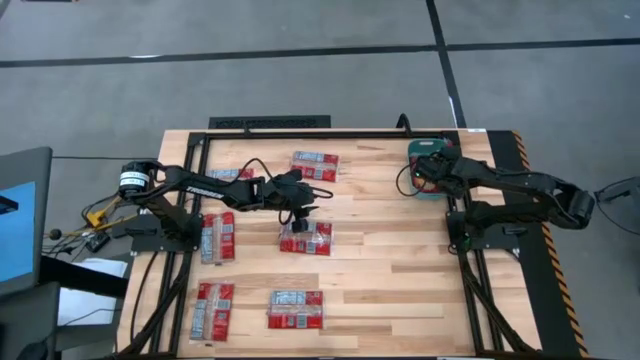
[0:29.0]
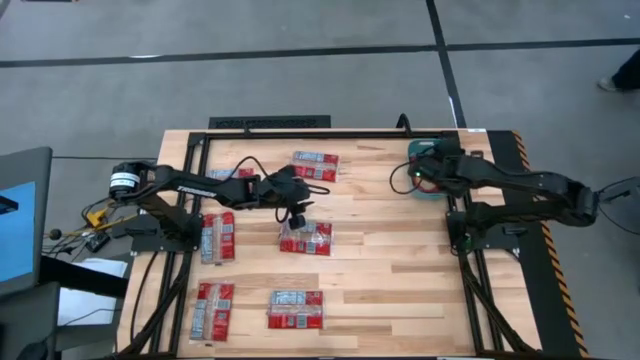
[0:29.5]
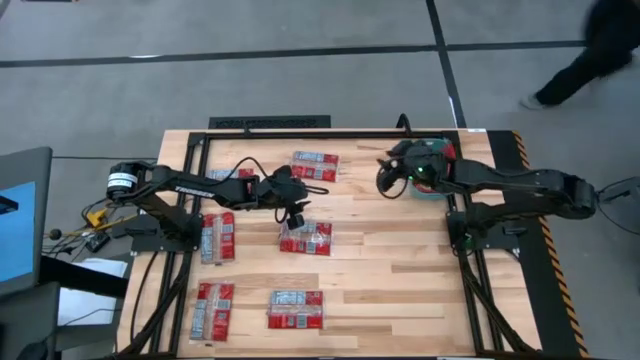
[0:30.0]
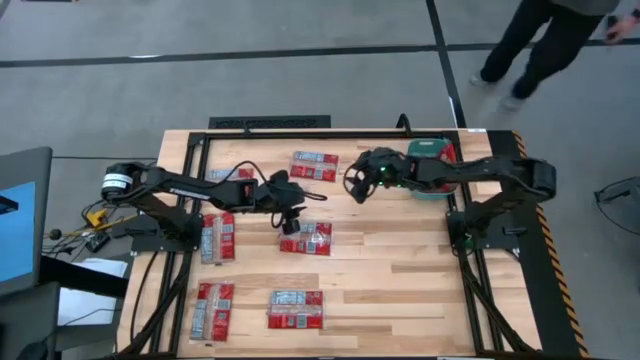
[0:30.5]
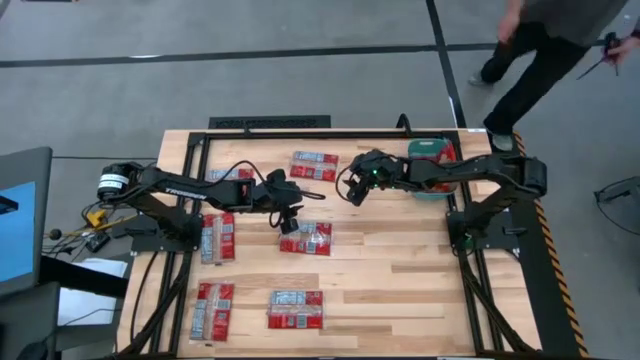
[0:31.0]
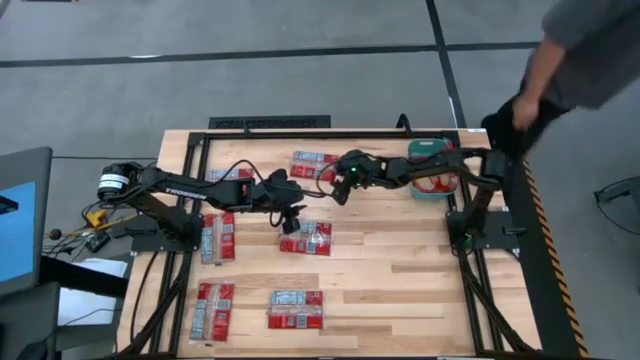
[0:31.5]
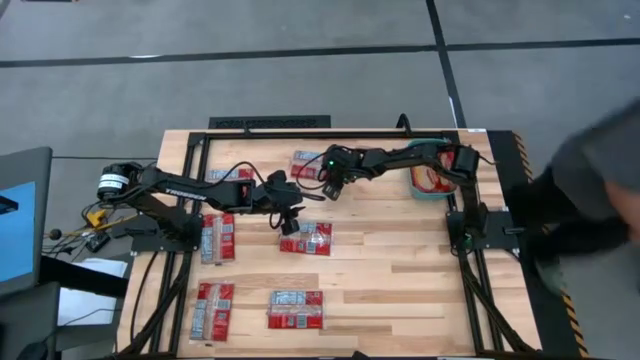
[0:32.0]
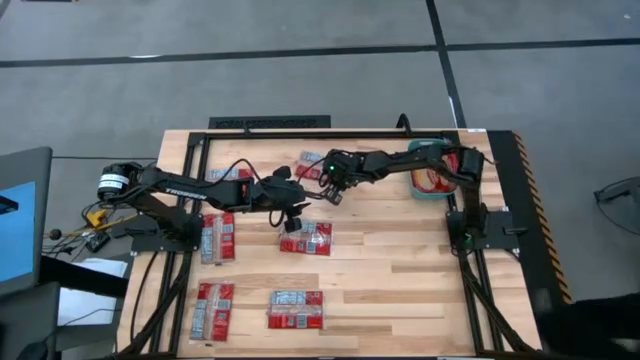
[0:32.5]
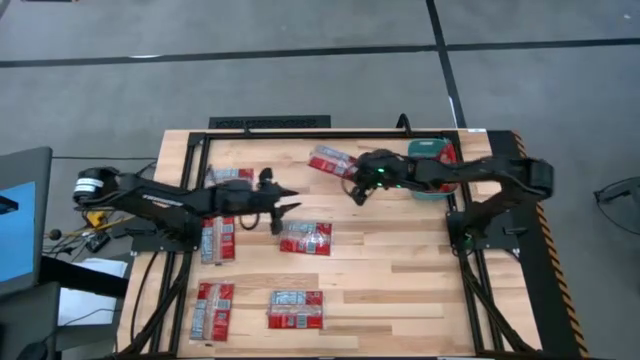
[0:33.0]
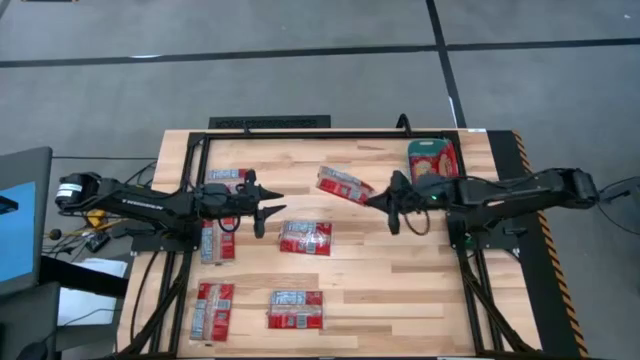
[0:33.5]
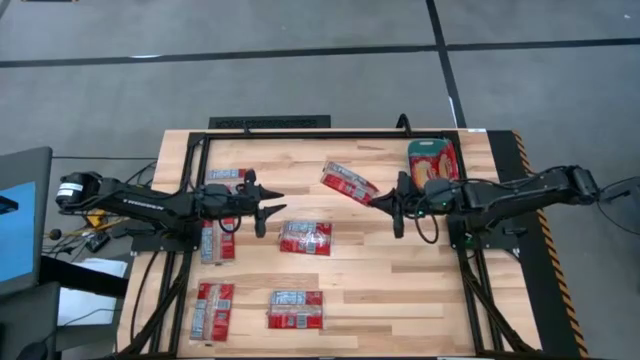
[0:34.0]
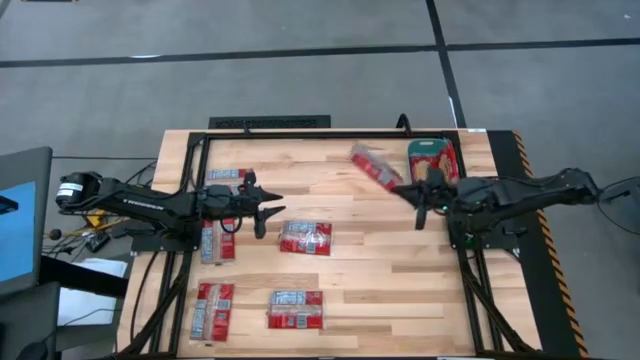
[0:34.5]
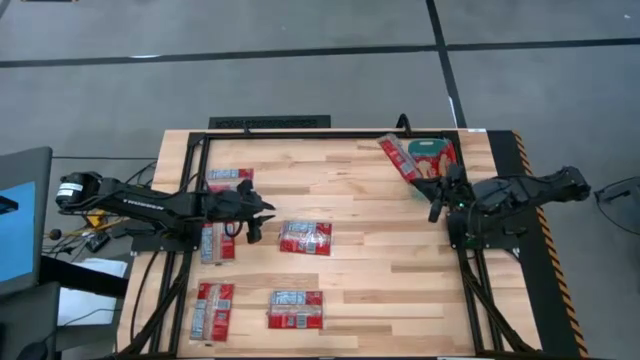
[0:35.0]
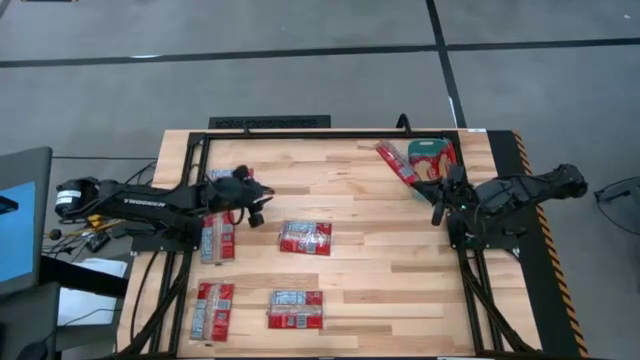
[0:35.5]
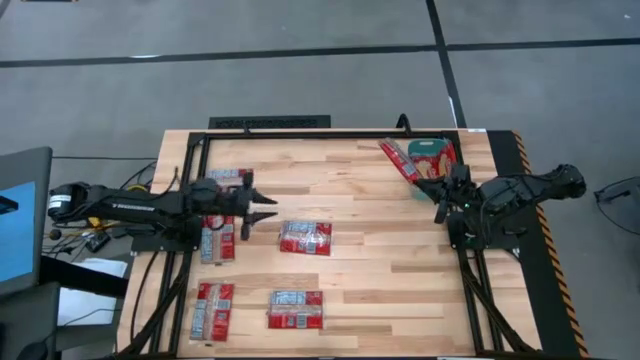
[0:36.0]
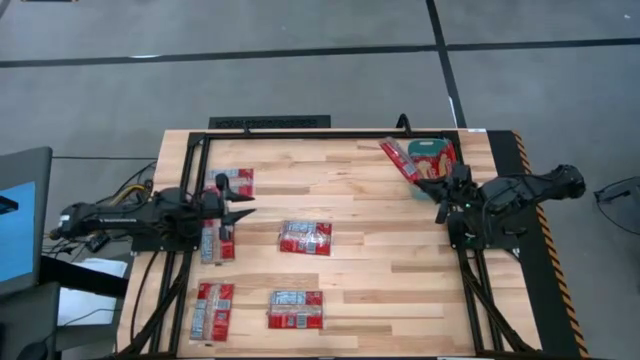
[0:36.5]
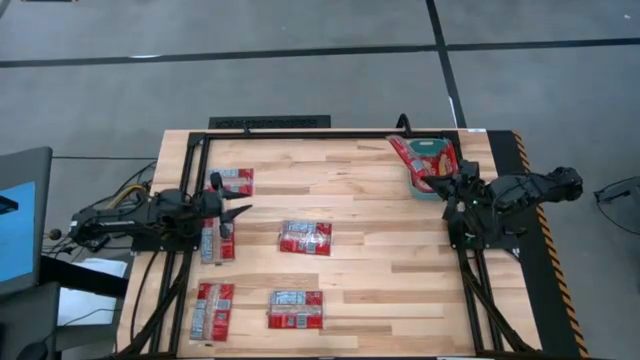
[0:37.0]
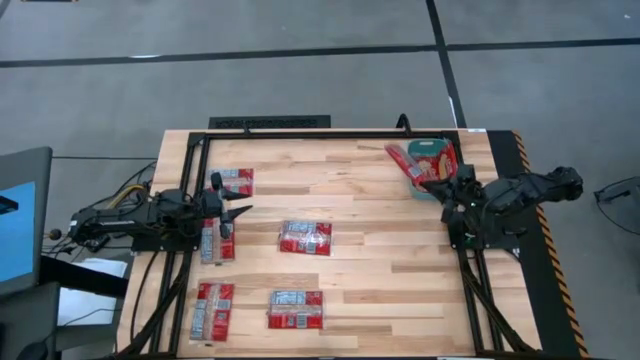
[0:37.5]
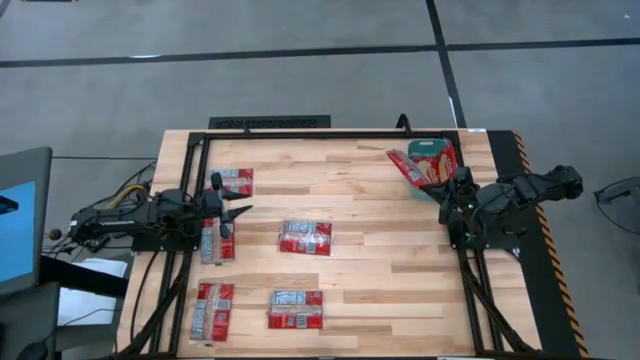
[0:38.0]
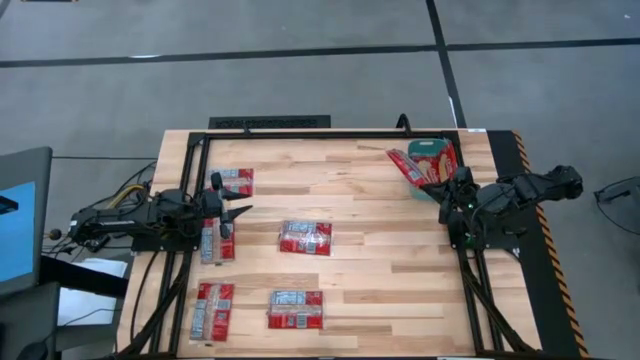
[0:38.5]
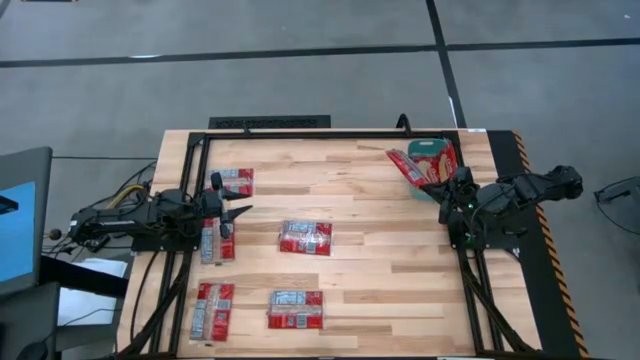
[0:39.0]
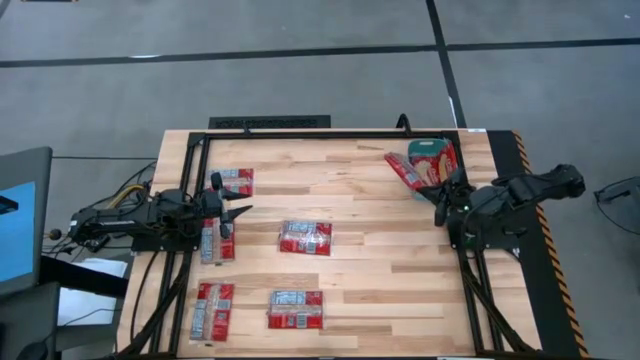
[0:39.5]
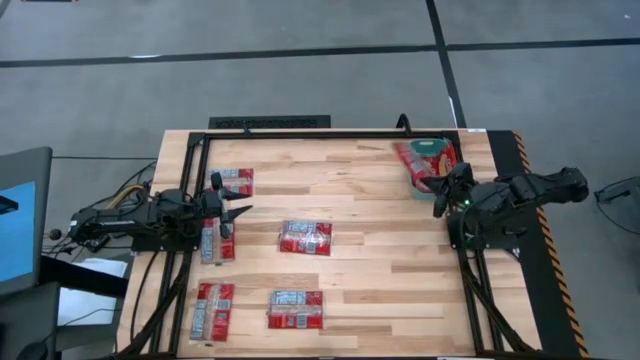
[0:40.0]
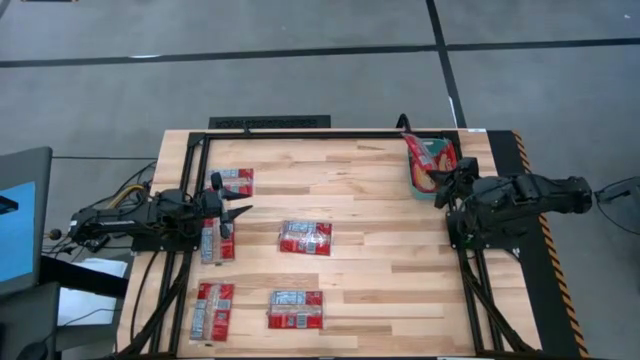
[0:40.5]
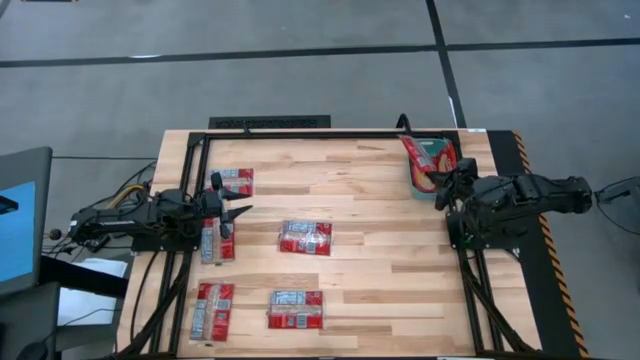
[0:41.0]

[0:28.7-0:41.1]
Task: Sort popcorn bags into baskets
Put the popcorn bag into the green bin

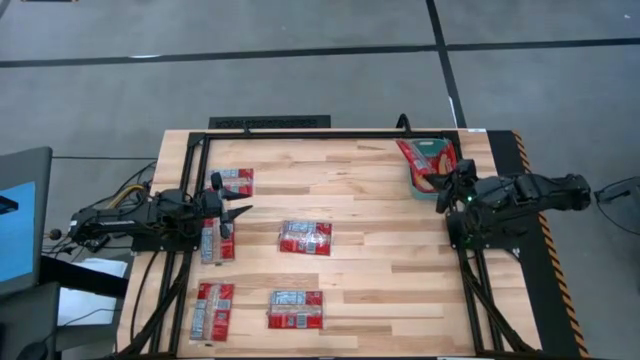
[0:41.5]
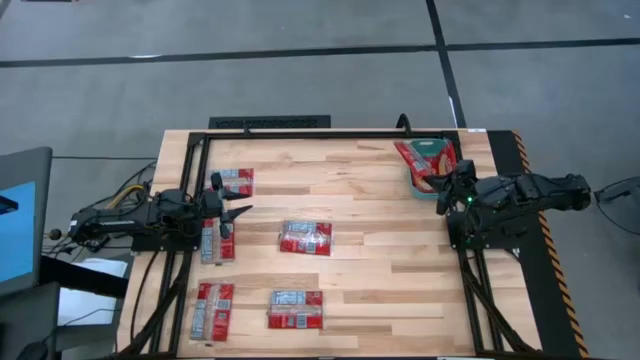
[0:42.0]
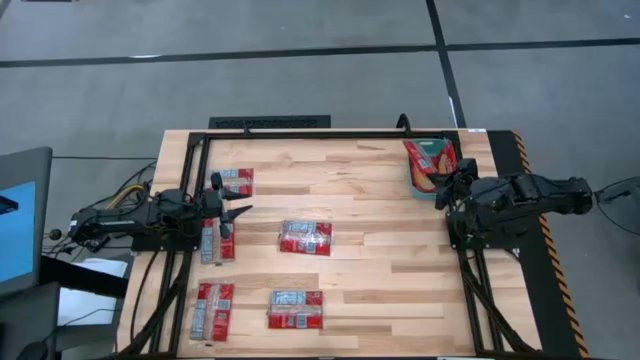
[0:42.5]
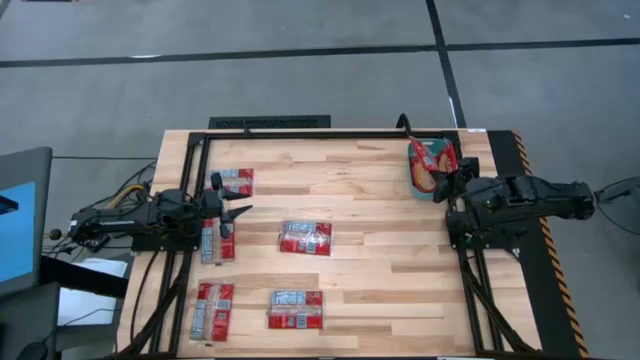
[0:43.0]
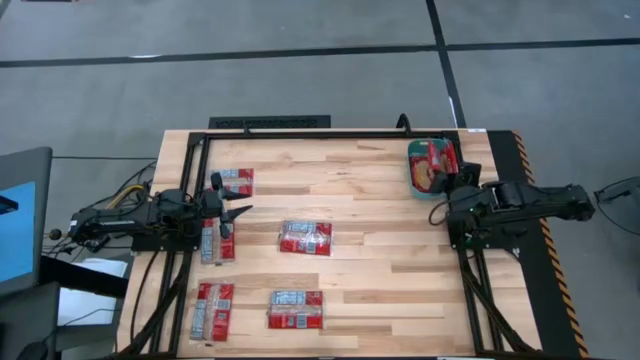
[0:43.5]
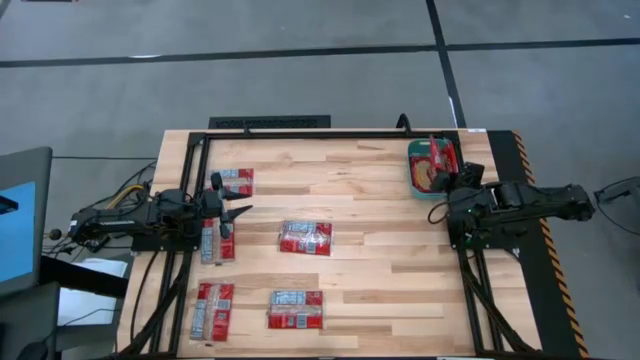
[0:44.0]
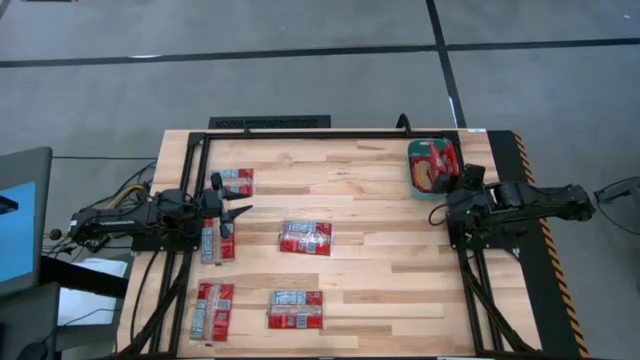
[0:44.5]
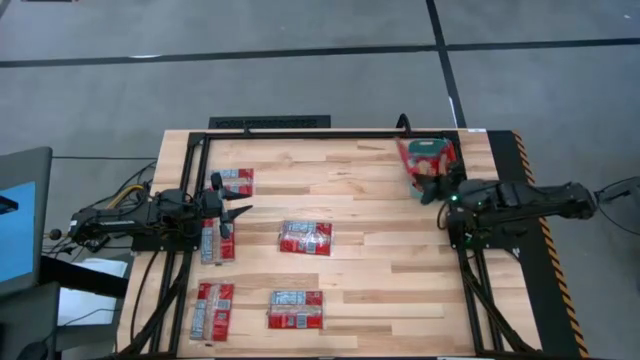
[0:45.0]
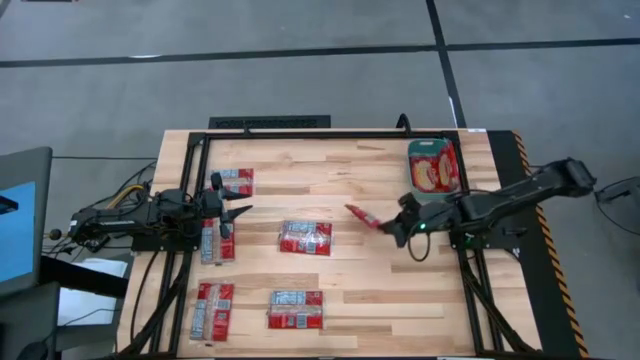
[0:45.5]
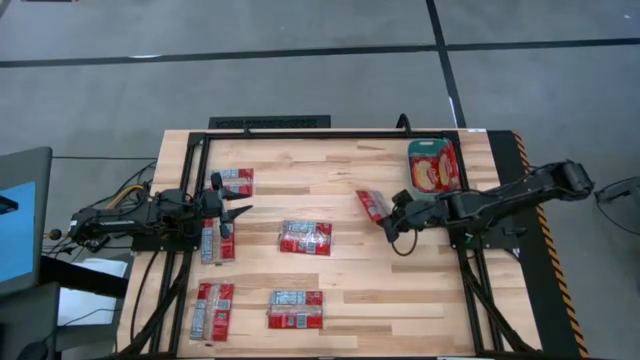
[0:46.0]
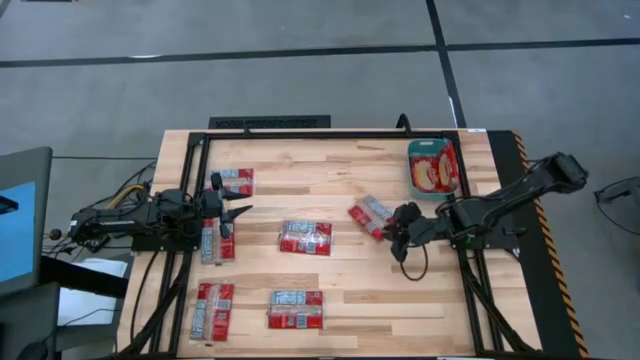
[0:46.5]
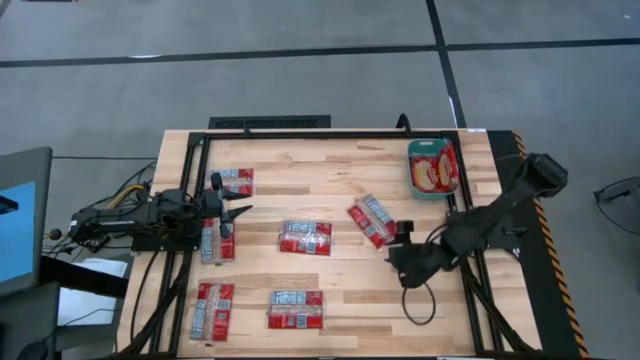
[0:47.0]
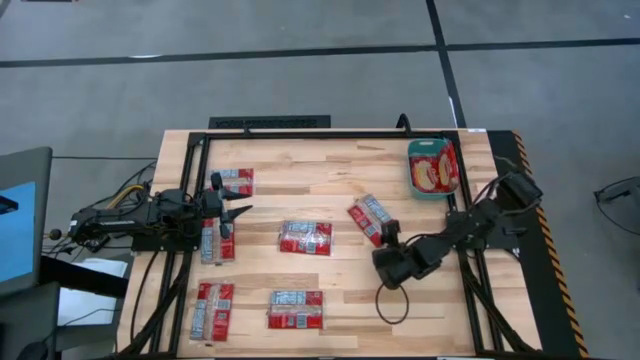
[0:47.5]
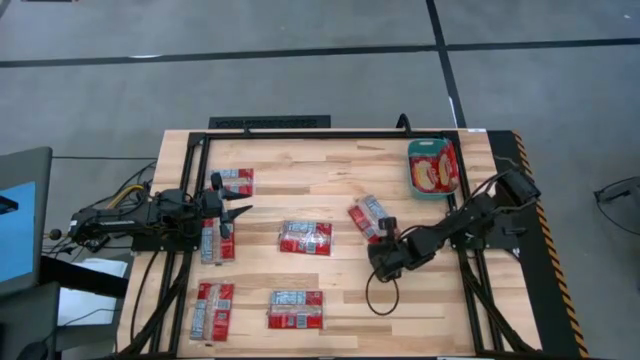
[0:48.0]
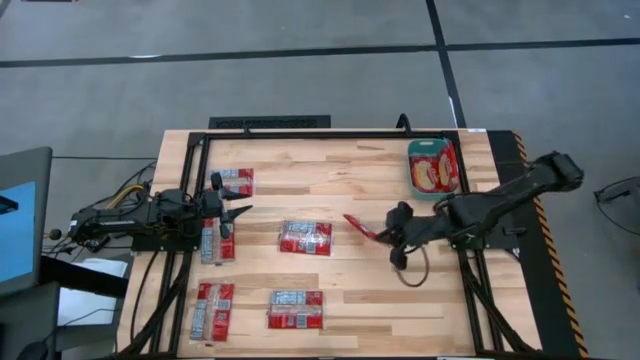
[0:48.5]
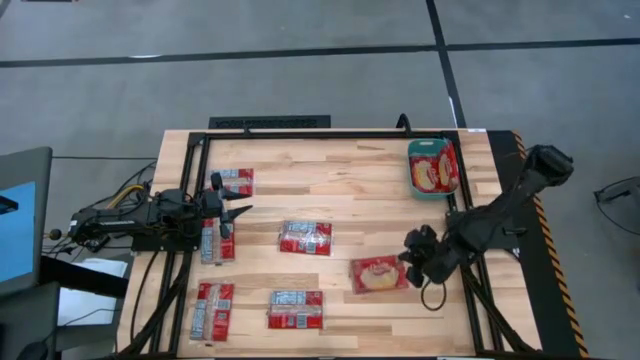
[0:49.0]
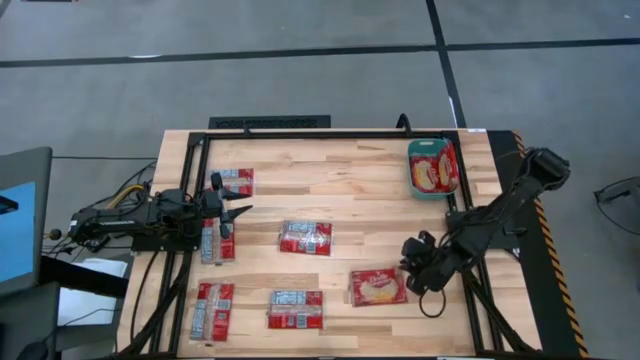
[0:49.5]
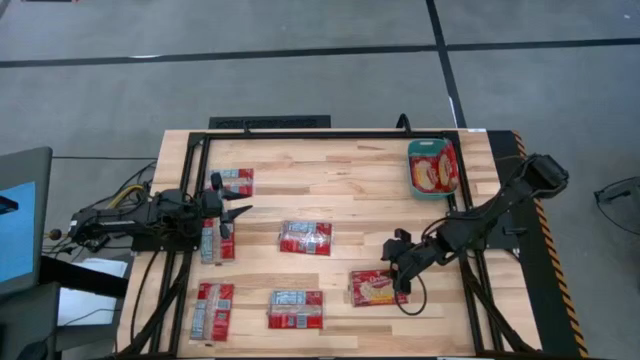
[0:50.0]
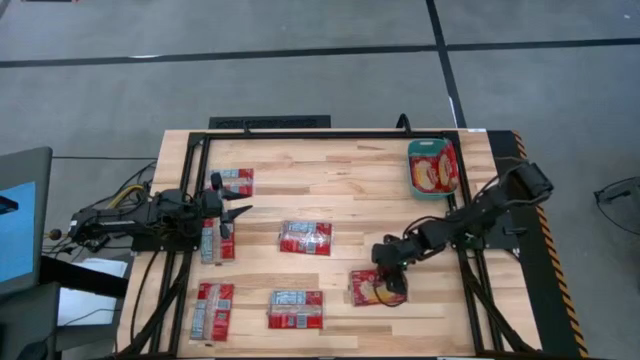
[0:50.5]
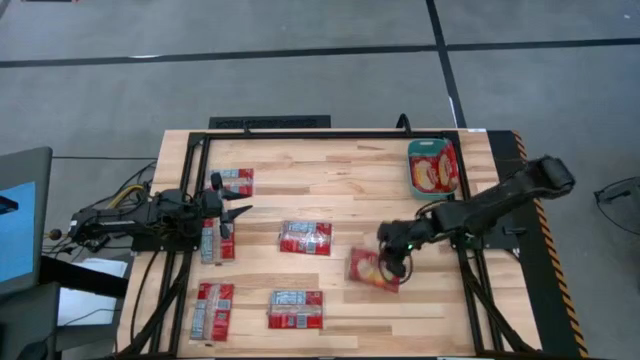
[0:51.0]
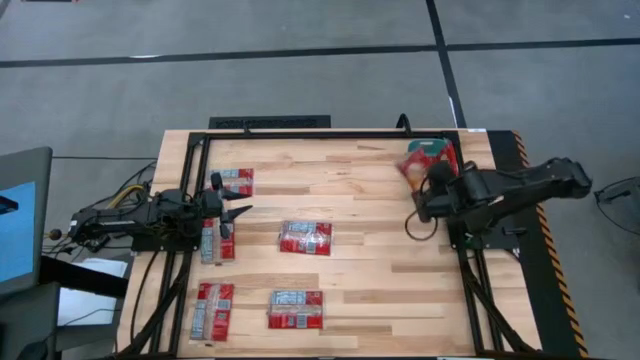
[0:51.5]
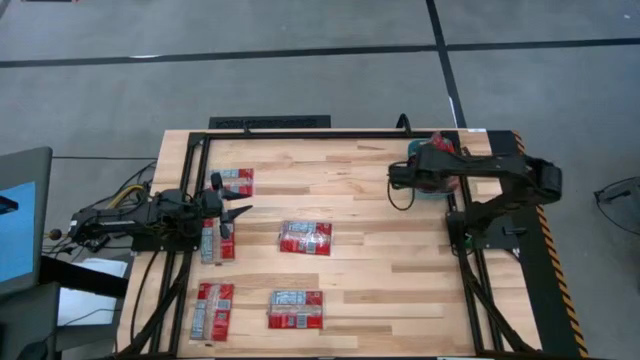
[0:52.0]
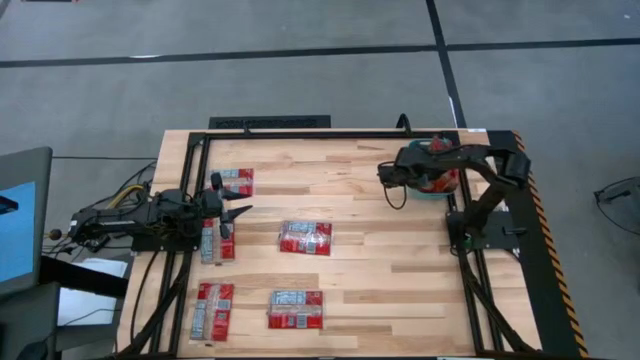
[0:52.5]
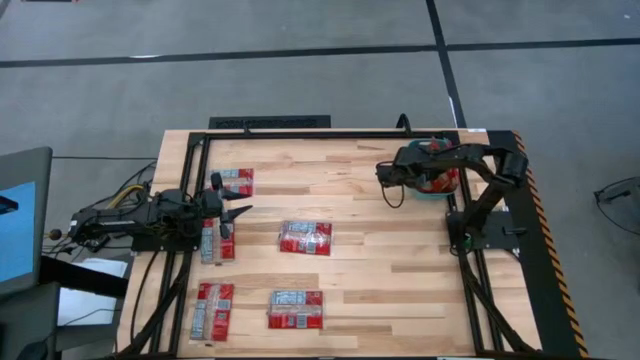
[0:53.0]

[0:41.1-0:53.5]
Put the popcorn bag into the green bin
